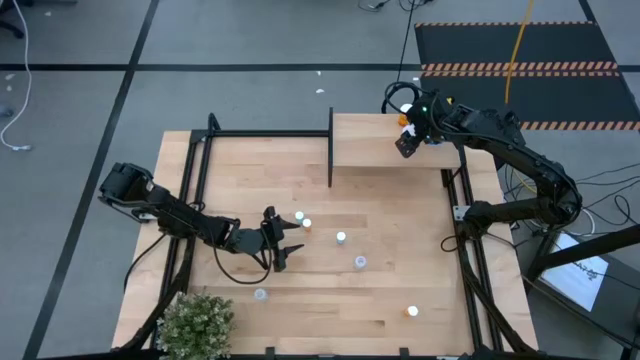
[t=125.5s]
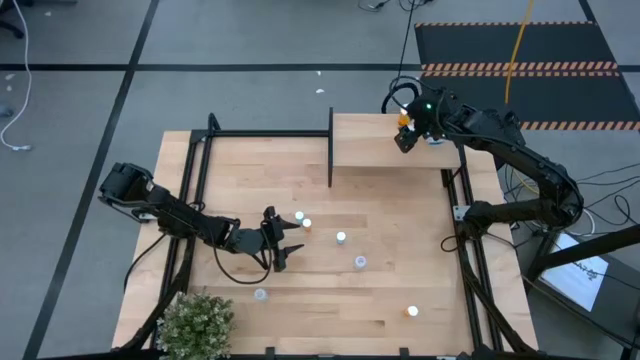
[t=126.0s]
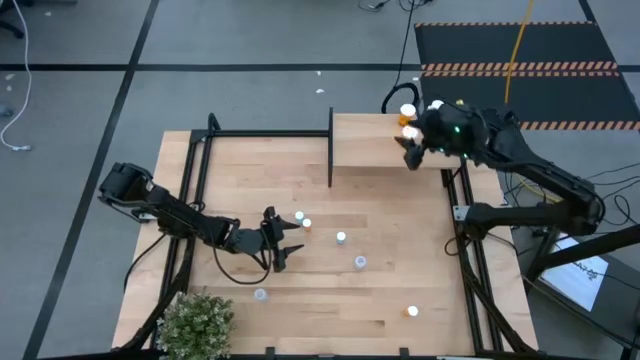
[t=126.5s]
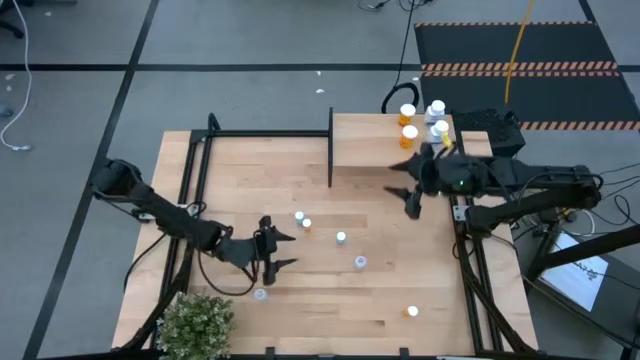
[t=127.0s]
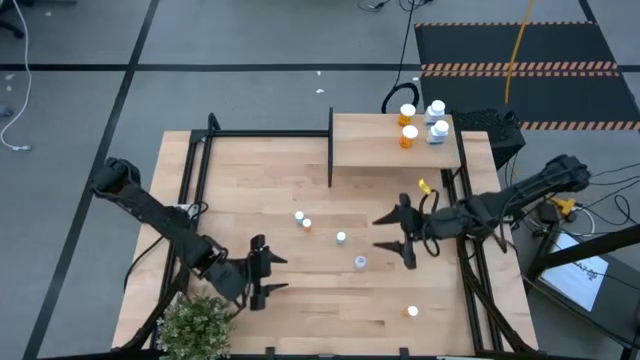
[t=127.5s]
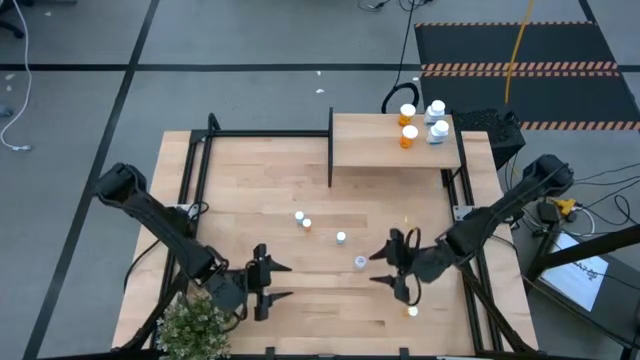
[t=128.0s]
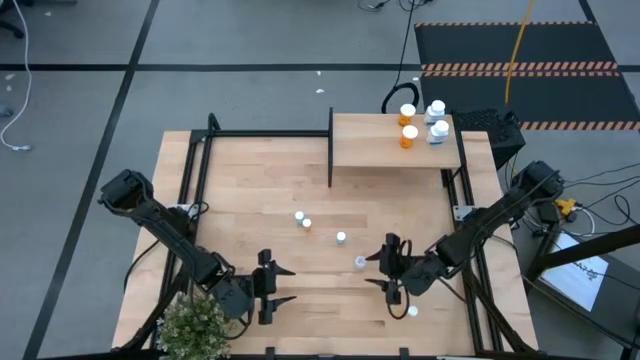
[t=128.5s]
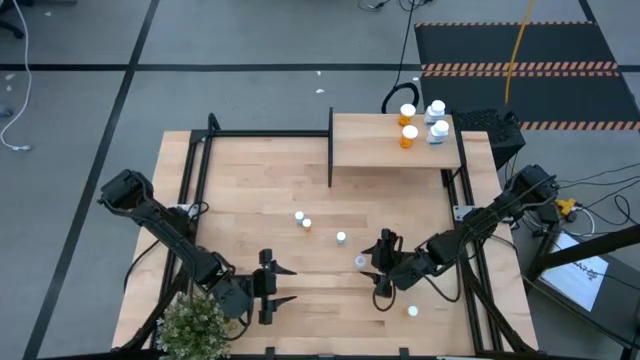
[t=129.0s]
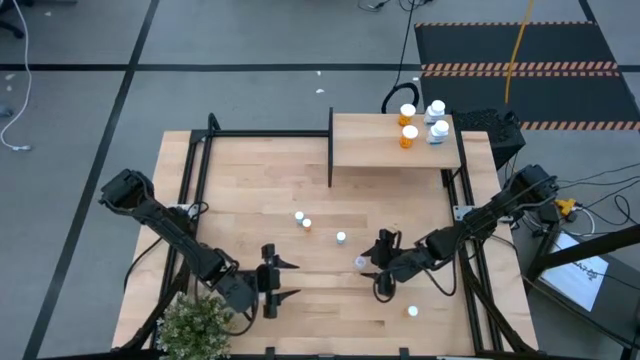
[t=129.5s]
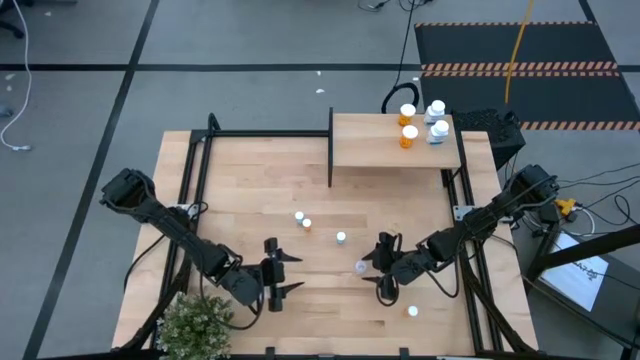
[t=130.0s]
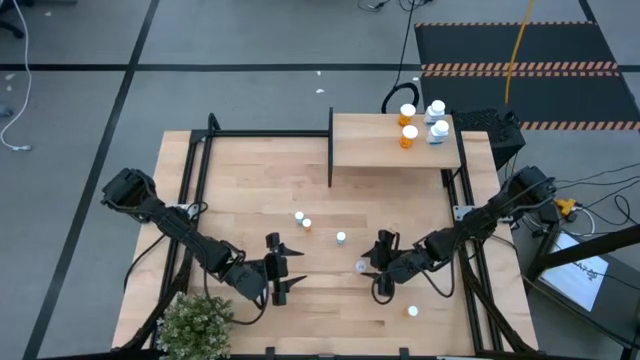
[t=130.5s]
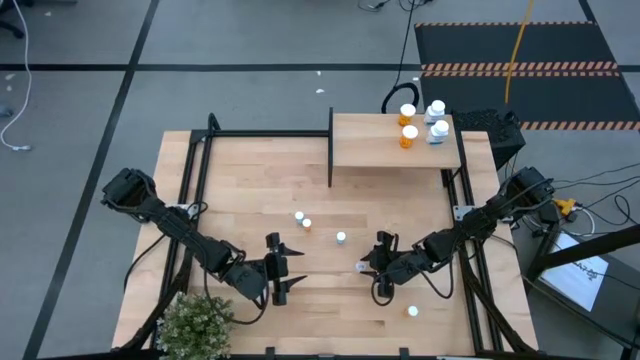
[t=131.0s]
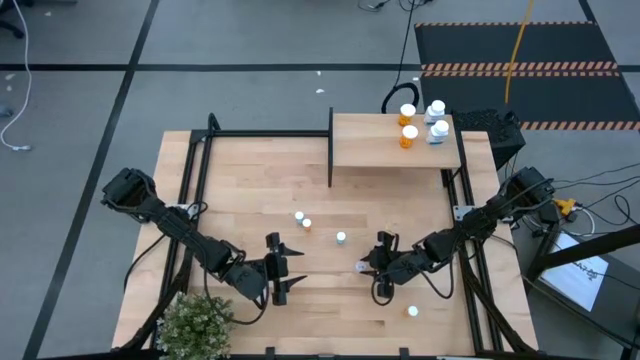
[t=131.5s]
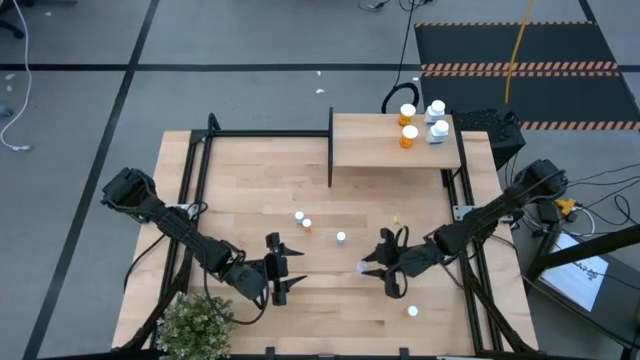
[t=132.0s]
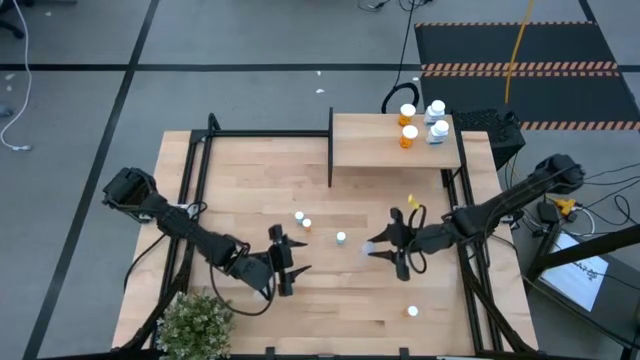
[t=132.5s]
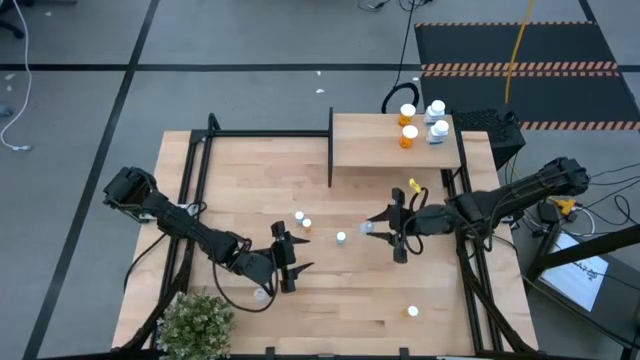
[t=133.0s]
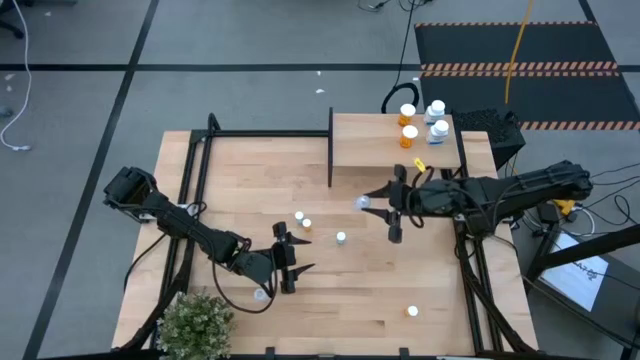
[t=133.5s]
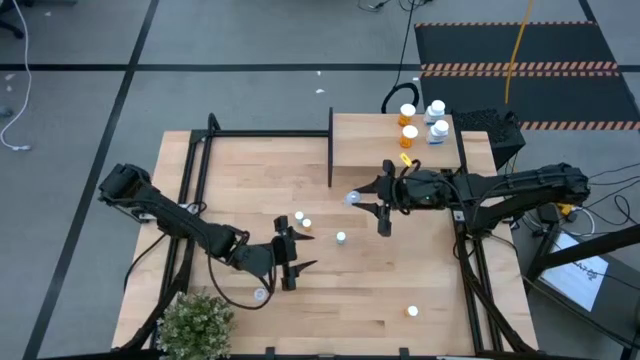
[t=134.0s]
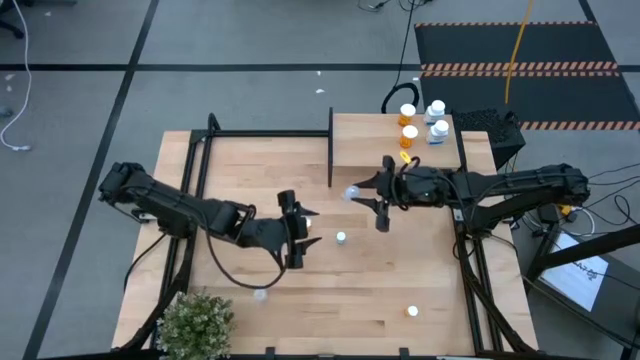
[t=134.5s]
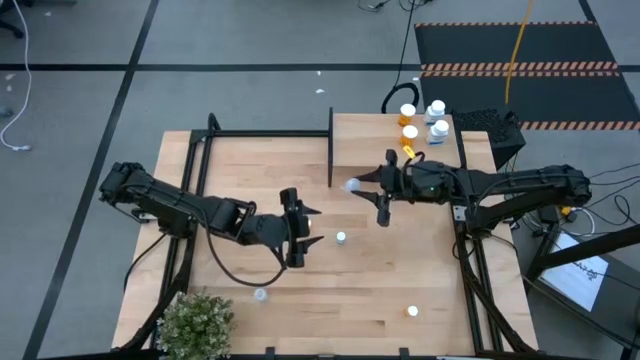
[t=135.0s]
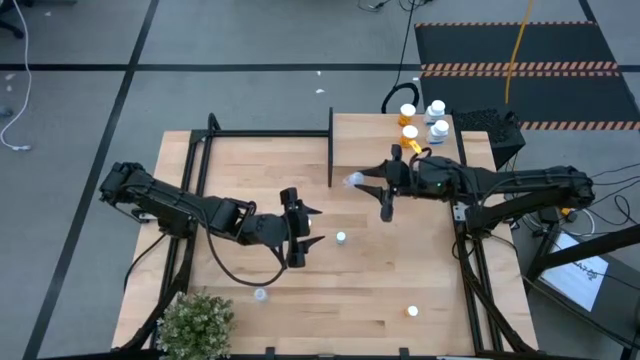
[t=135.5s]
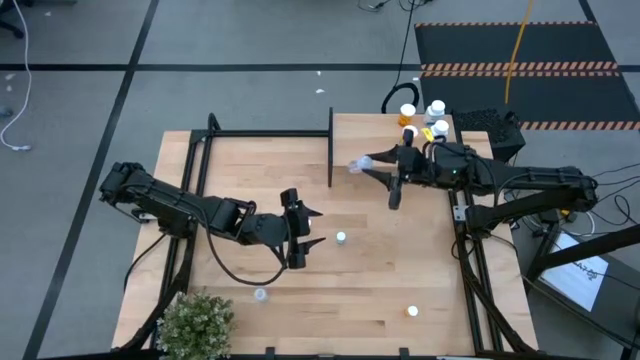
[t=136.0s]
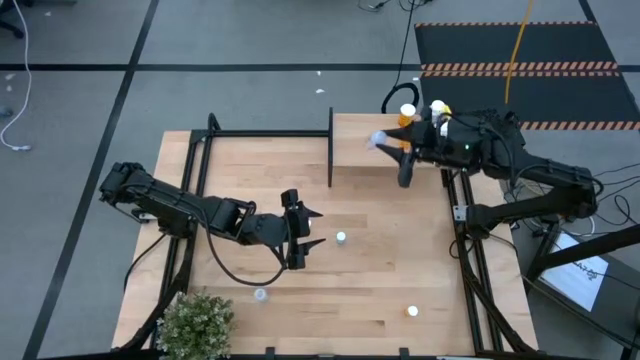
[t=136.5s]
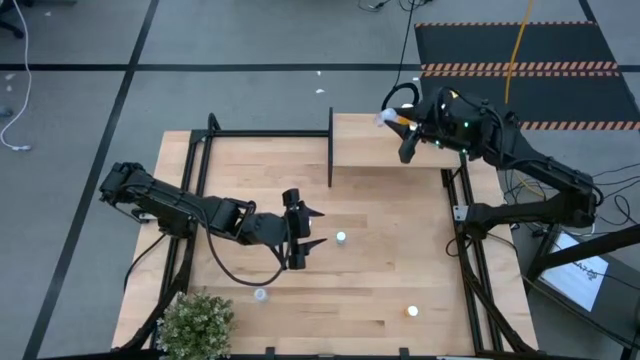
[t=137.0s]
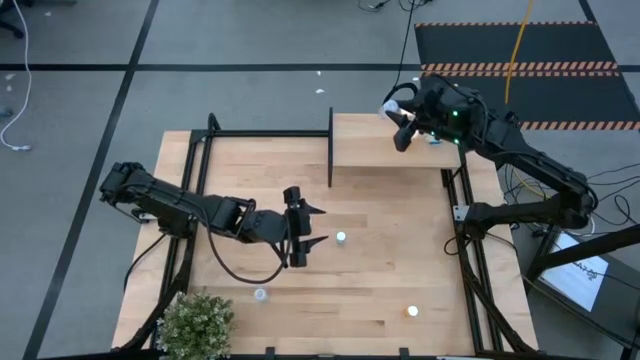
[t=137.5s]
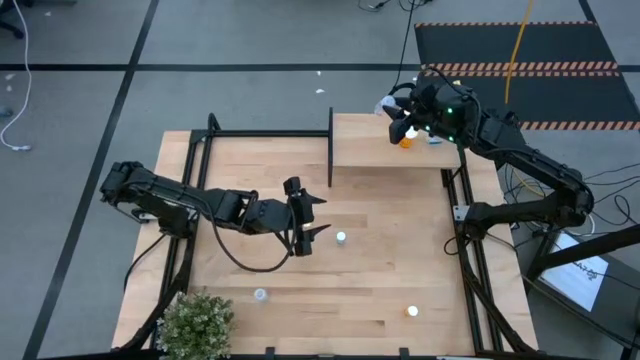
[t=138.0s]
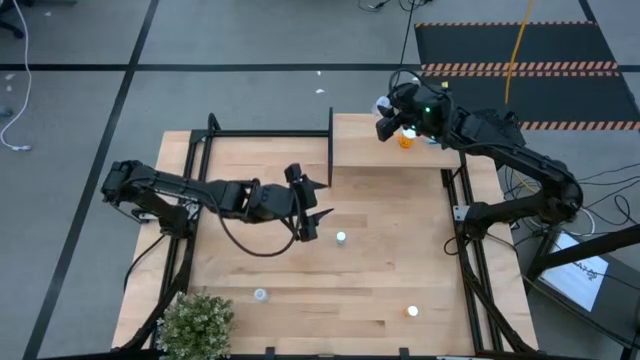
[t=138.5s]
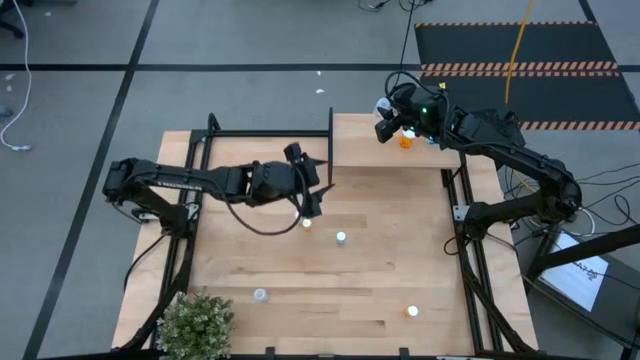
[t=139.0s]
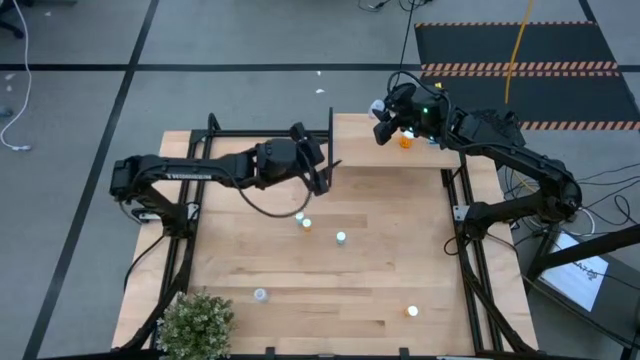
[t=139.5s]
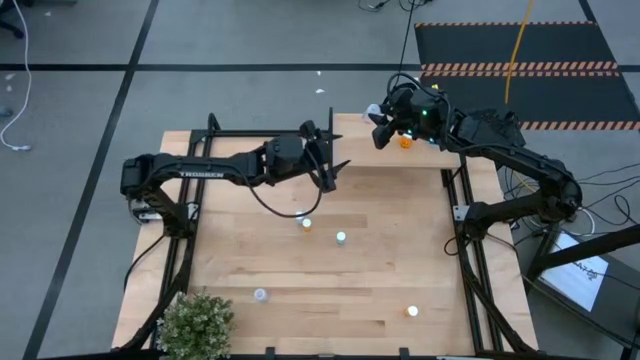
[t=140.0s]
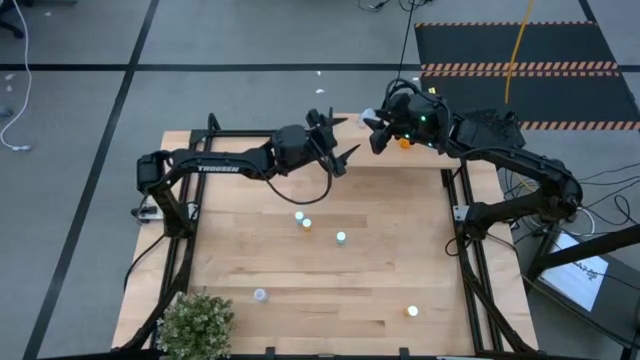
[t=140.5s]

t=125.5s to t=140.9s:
Task: Pick and place medicine bottles onto shelf by color
Put the top transparent pill bottle on the shelf

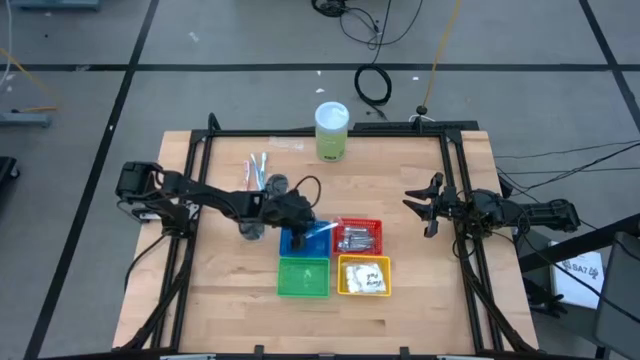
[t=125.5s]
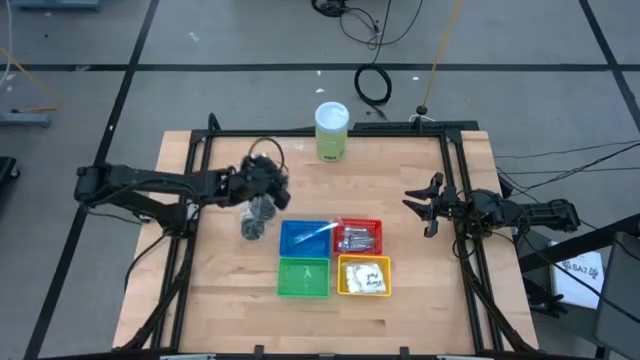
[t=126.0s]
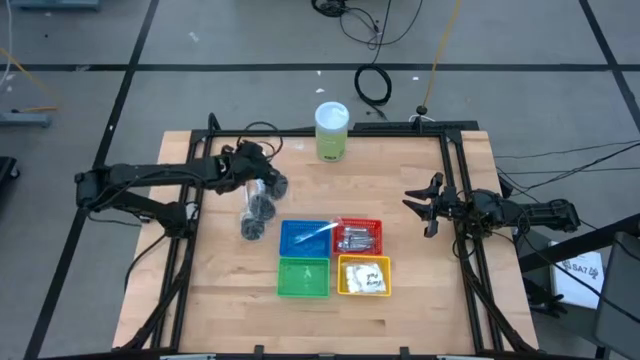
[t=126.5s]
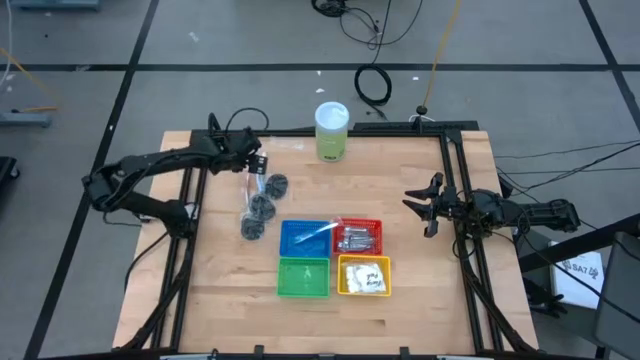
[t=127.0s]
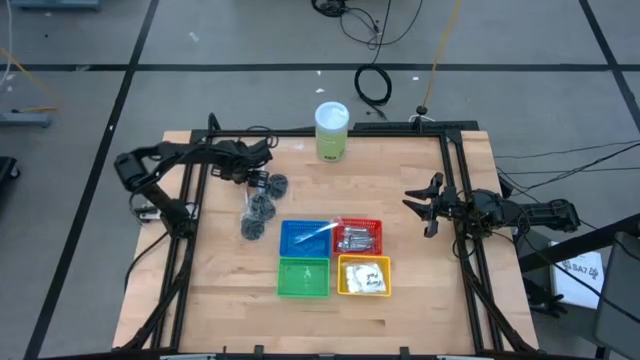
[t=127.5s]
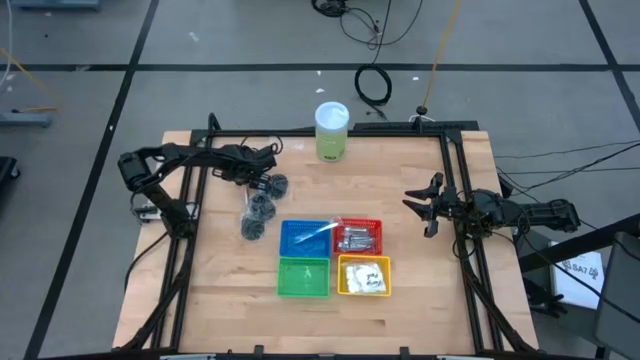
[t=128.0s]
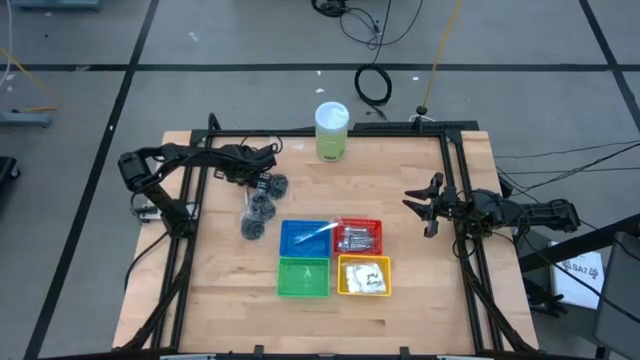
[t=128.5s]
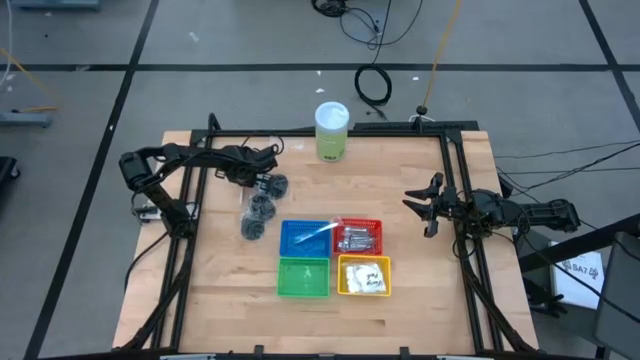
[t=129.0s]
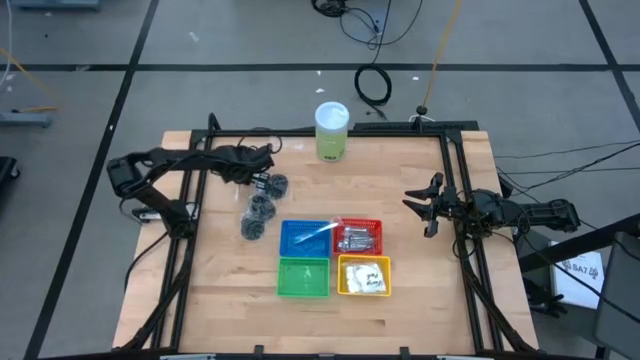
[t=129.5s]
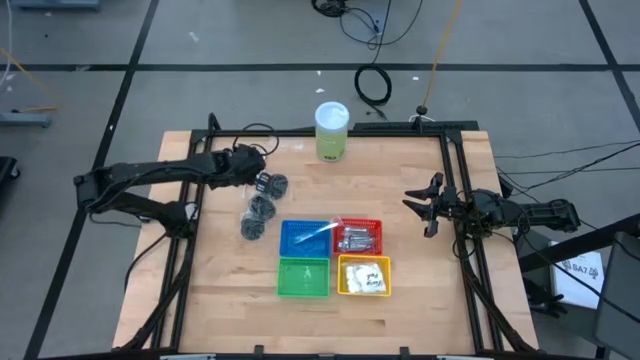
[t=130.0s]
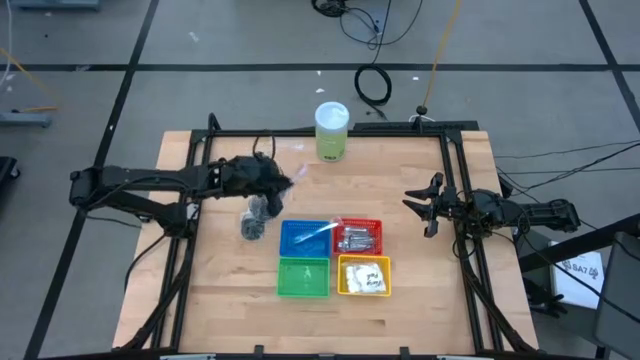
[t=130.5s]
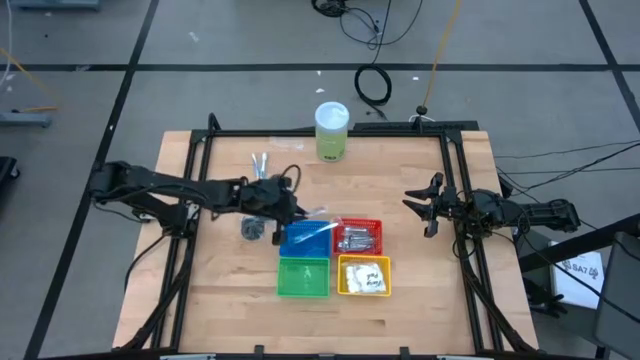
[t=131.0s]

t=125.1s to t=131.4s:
Task: Pick & Place Travel size toiletries
Put the orange toothbrush into the blue basket
